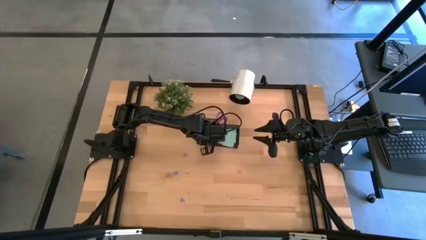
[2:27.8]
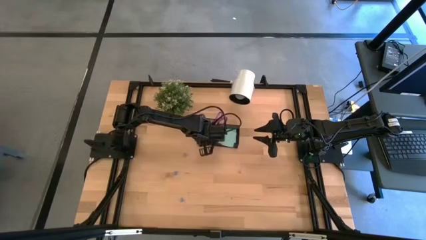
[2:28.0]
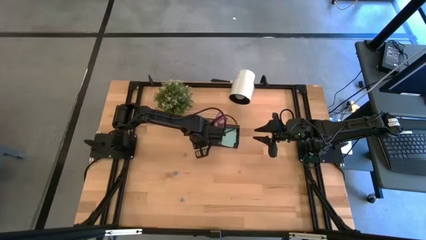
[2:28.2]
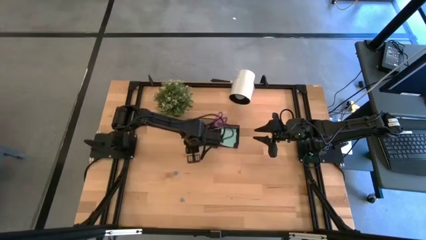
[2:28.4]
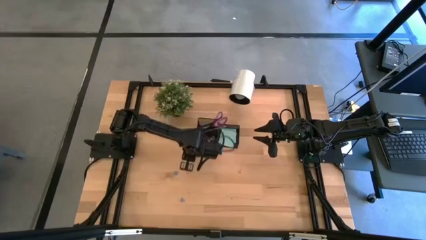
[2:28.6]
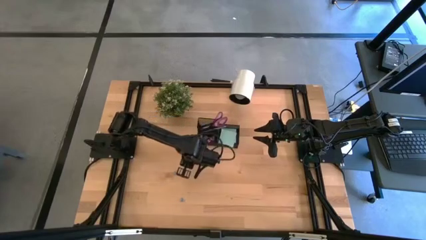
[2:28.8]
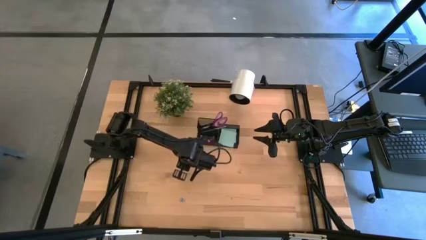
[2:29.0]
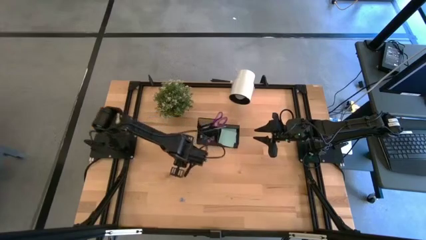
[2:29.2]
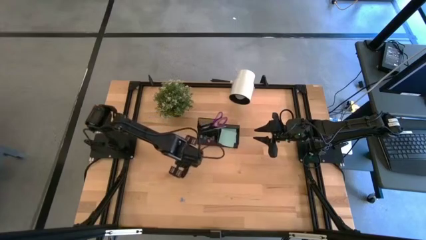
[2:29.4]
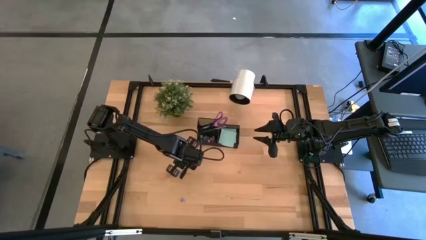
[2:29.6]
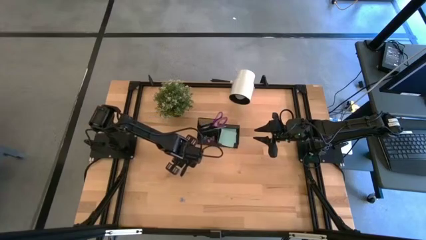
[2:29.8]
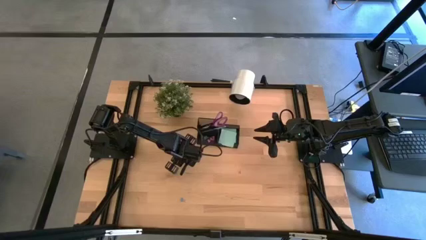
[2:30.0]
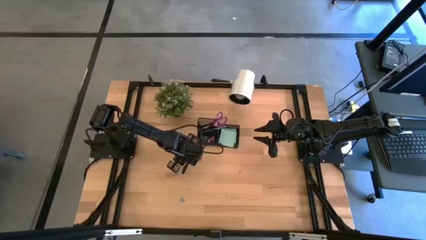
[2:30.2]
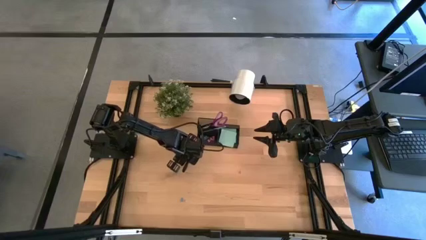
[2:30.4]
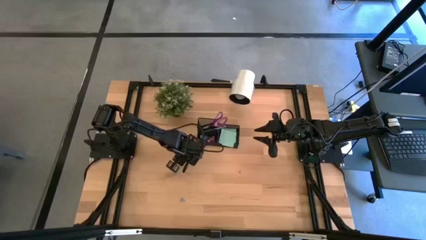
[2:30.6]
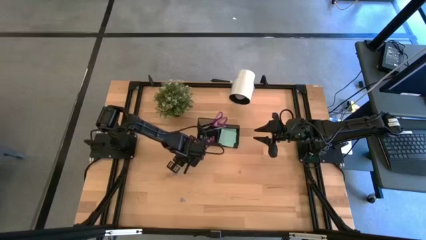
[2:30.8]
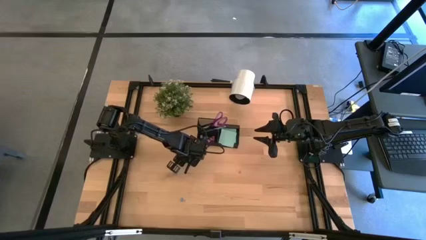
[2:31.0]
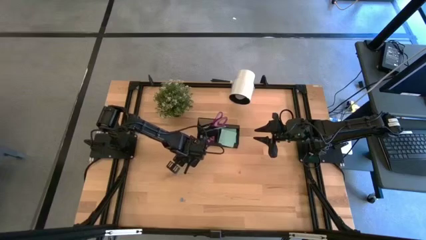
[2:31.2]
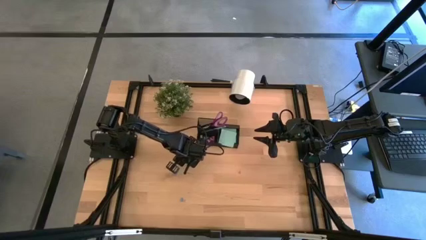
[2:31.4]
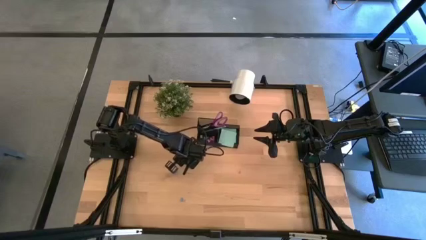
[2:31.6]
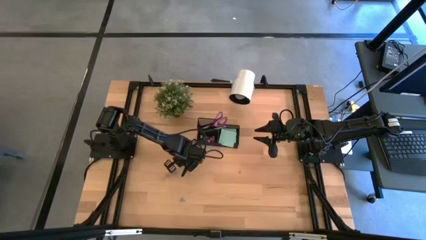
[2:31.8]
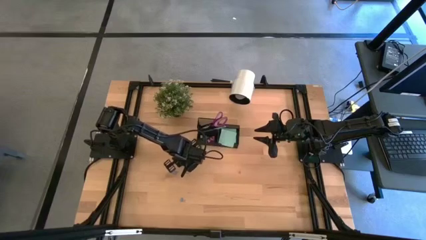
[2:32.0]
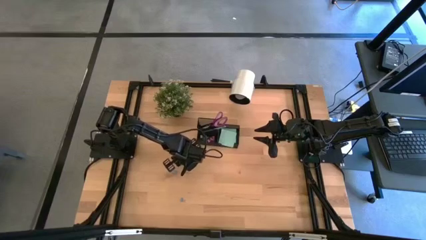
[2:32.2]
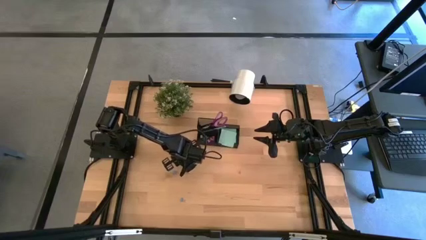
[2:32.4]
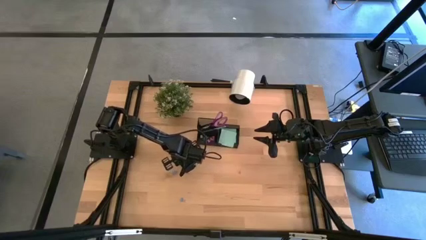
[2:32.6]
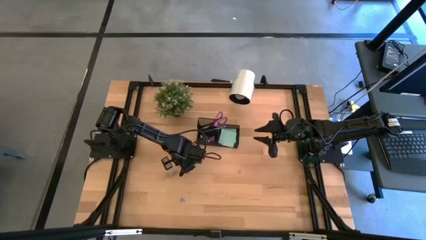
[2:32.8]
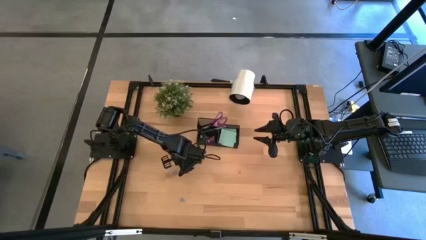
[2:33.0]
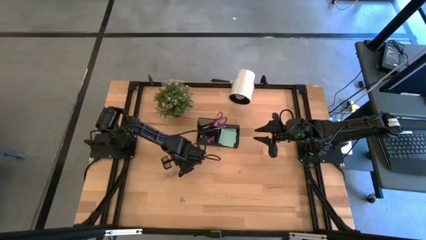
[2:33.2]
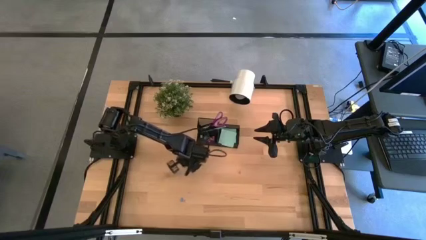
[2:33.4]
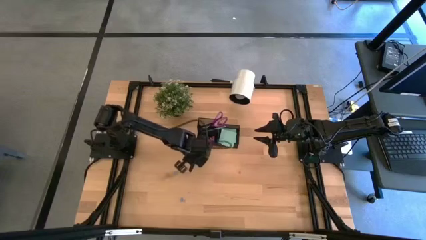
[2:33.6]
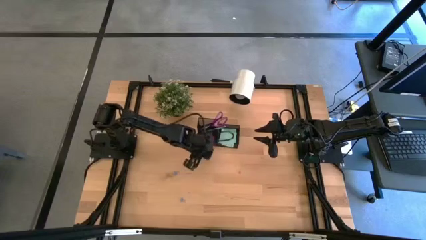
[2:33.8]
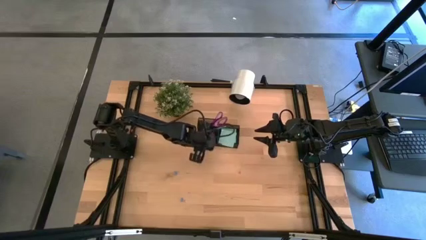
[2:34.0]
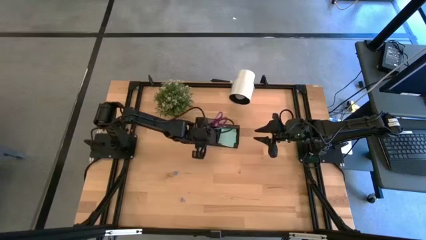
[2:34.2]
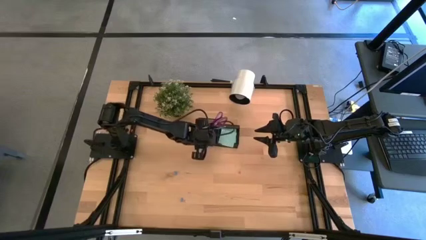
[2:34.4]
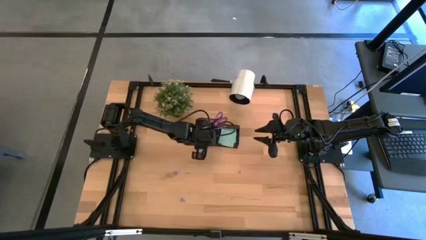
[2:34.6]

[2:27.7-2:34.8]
Task: Pick and place office supplies into organizer
Put the pink binder clip into the black desk organizer

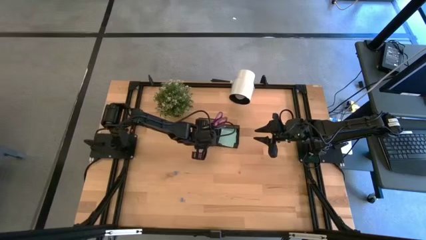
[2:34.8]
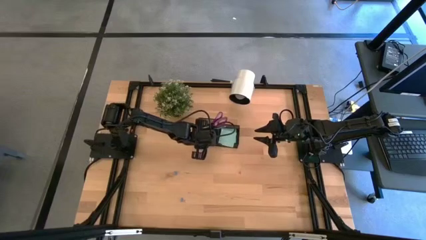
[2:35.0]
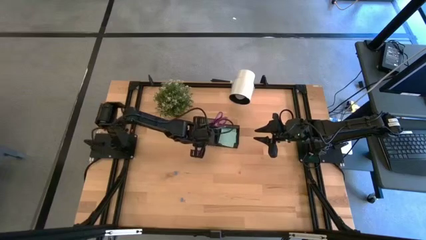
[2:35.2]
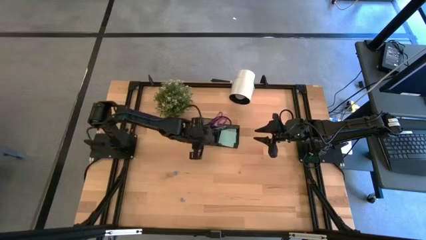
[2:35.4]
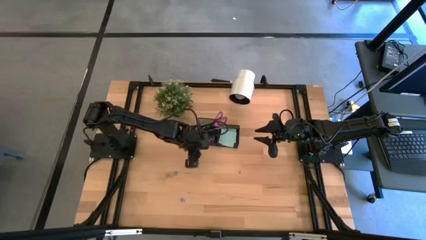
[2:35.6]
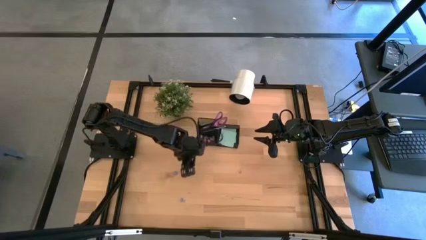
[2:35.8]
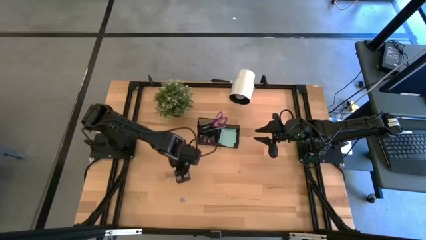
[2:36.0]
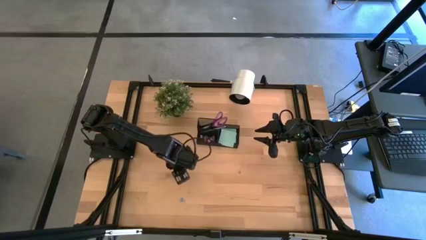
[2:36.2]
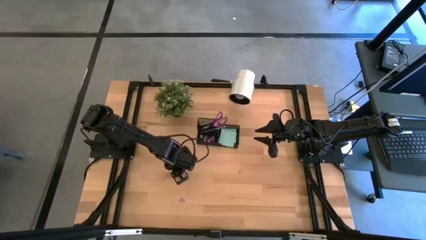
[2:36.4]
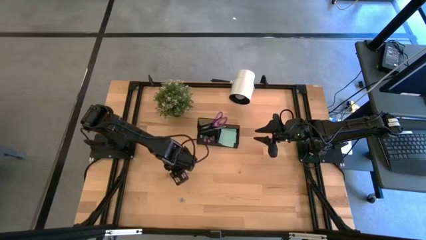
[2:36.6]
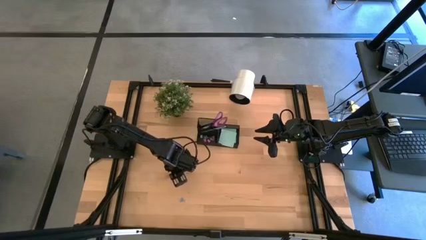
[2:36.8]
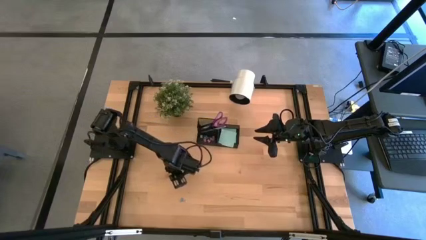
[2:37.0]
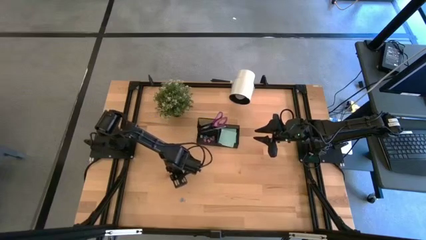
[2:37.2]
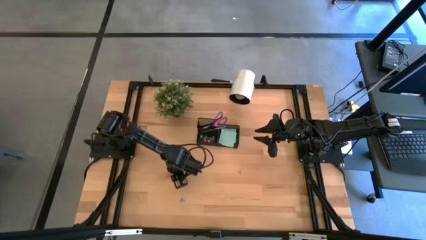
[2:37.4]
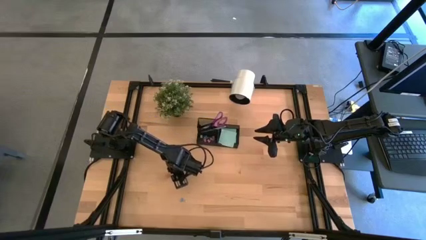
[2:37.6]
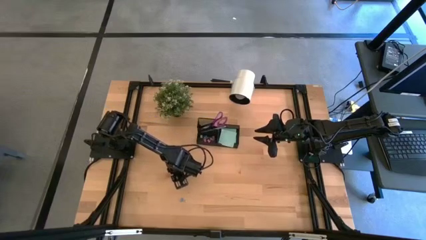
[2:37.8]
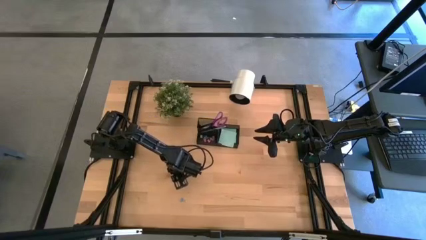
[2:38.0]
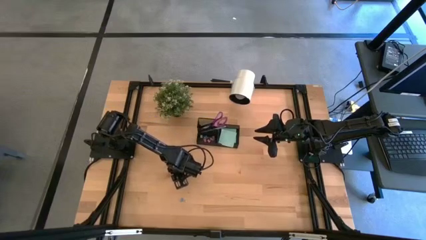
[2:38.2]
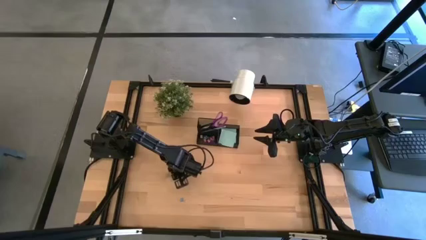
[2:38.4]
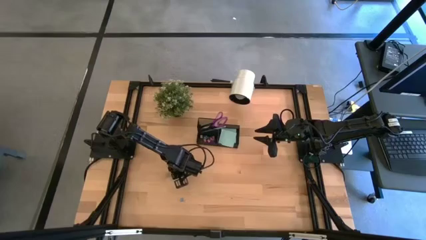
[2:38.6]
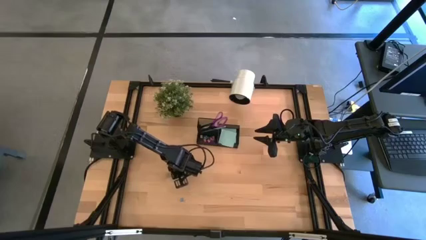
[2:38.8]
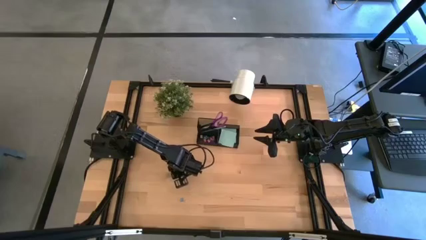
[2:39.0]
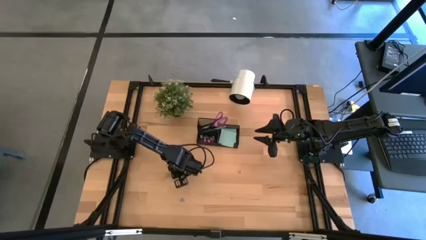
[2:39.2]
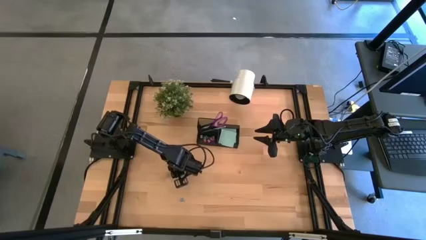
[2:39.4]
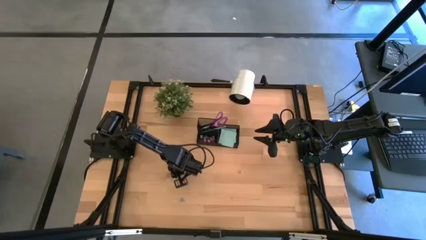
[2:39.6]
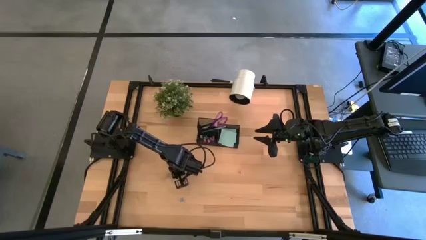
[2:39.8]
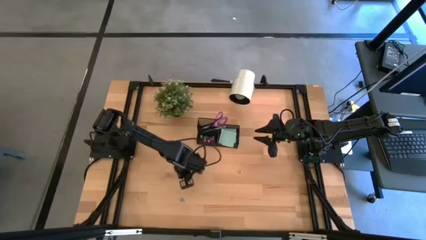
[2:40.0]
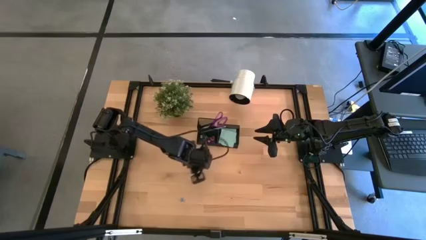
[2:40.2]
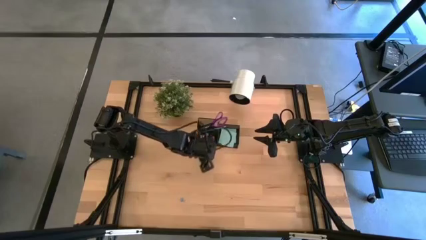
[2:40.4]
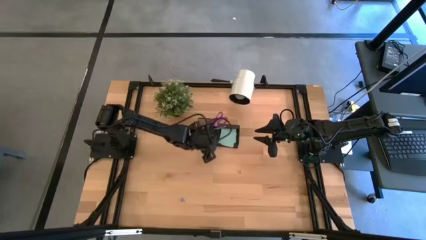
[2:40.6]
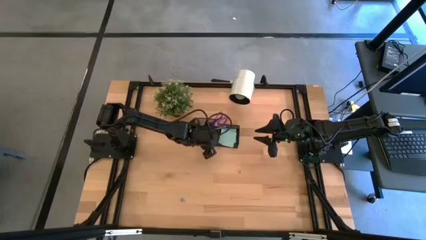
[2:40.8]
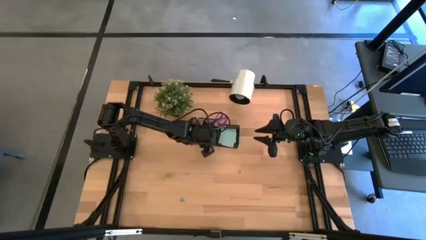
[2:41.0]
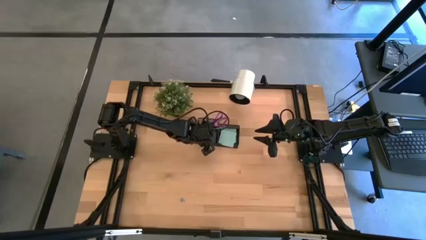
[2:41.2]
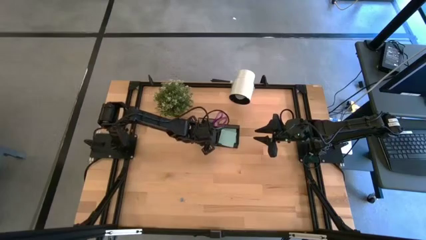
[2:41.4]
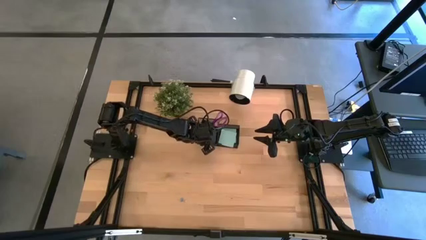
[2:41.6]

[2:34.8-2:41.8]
Put the blue binder clip into the black desk organizer
